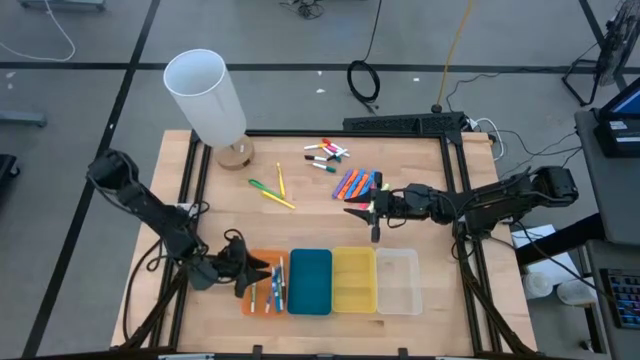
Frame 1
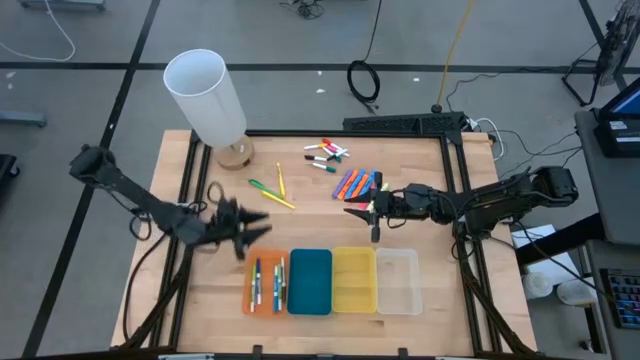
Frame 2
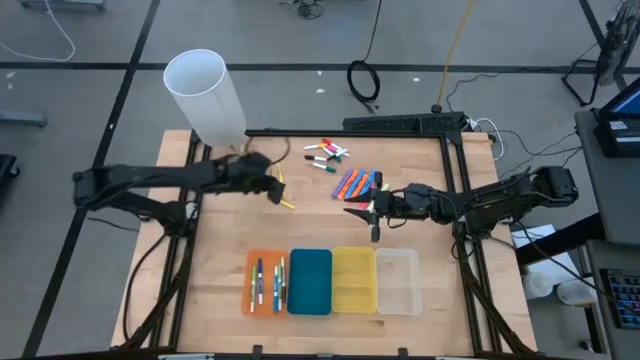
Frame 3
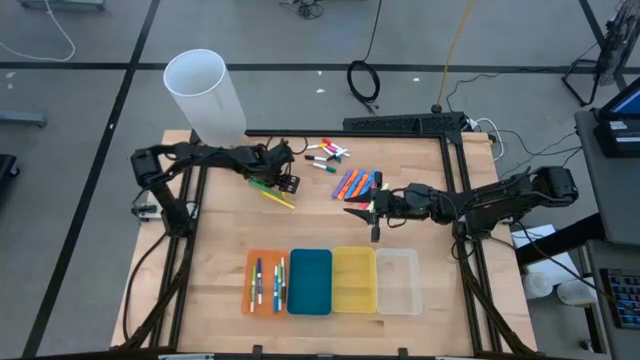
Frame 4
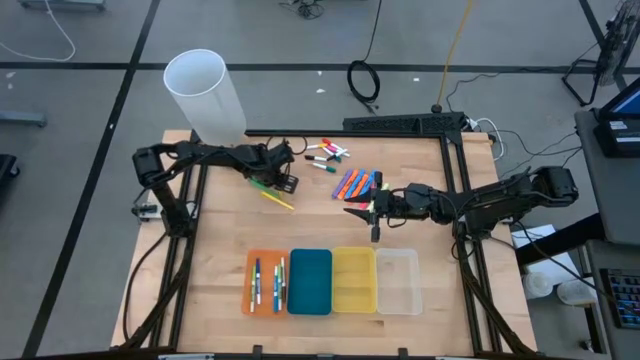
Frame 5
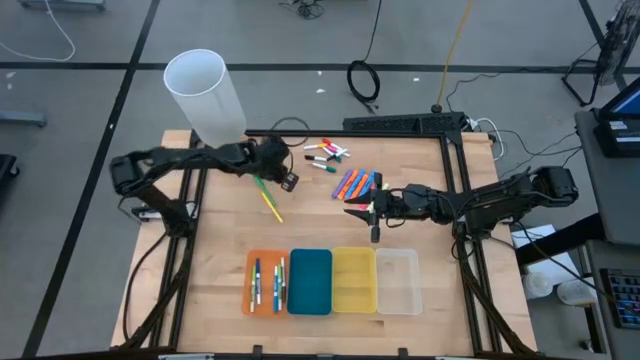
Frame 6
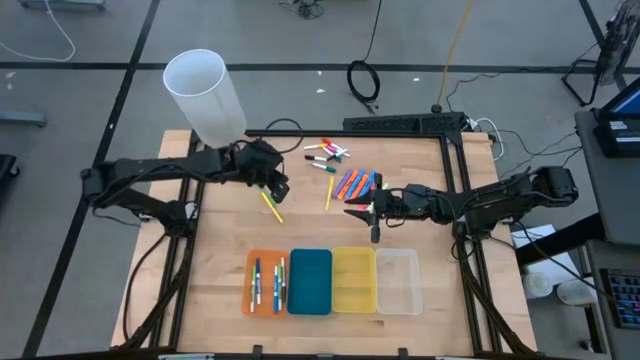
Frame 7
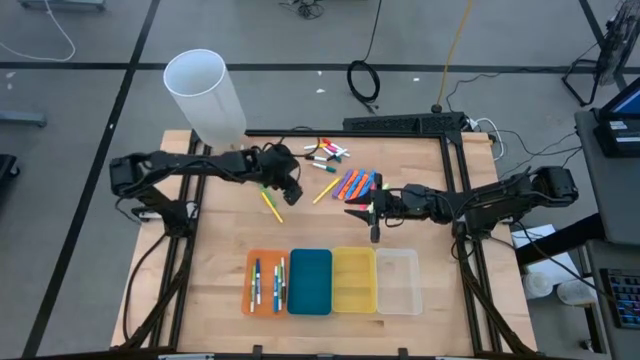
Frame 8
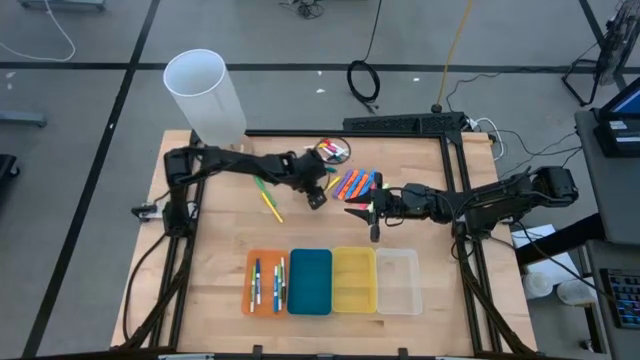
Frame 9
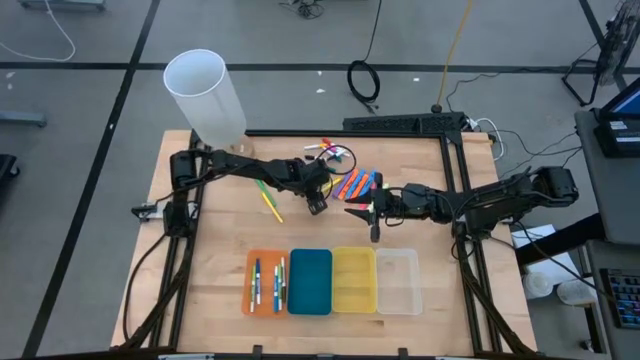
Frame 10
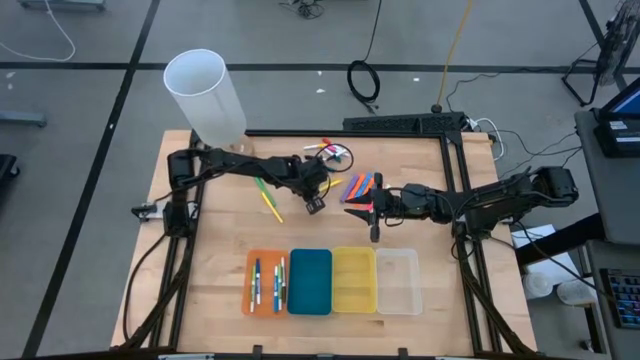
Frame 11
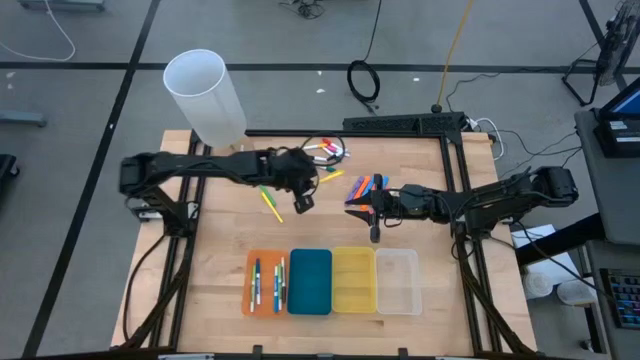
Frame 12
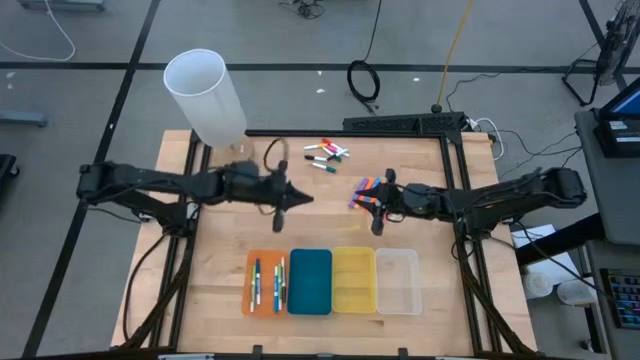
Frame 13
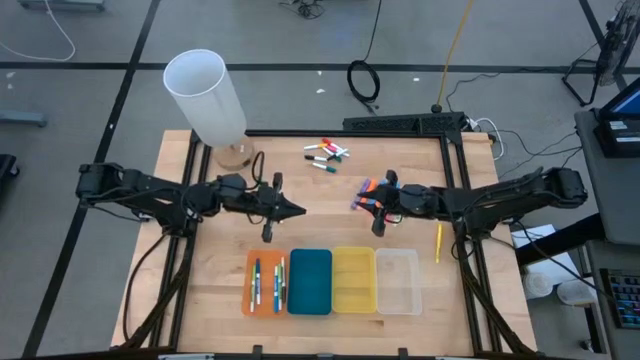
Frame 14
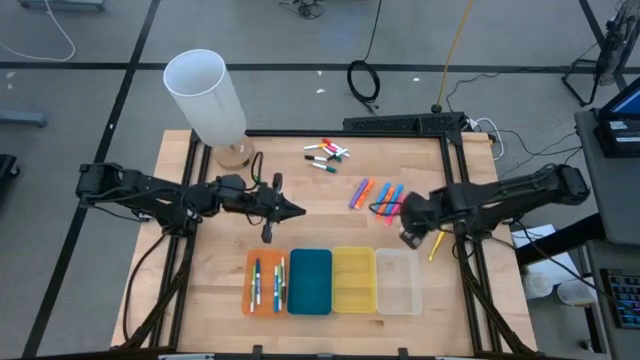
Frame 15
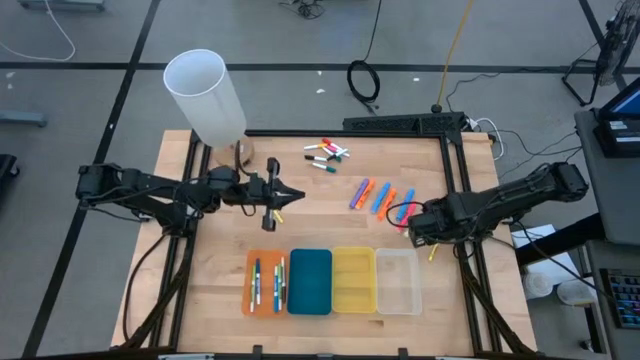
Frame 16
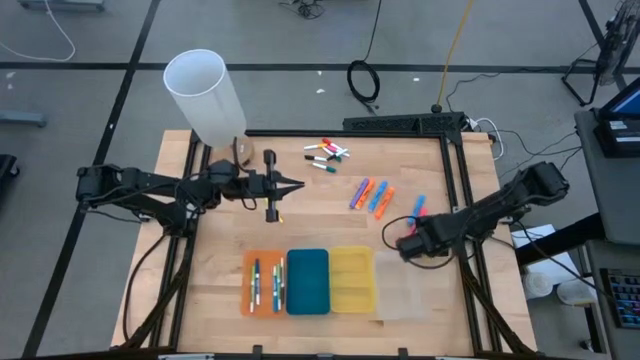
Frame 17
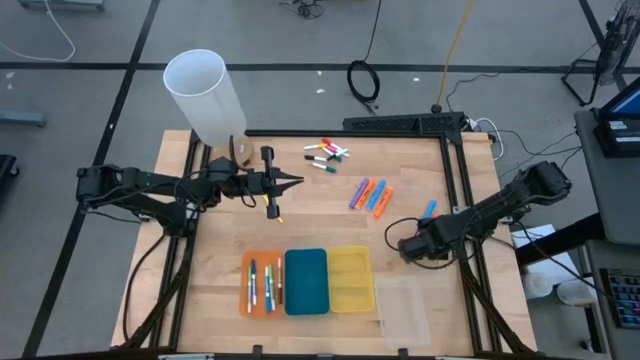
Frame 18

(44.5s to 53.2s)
Task: Pick & Place Markers
Put the top yellow pen into the transparent bin

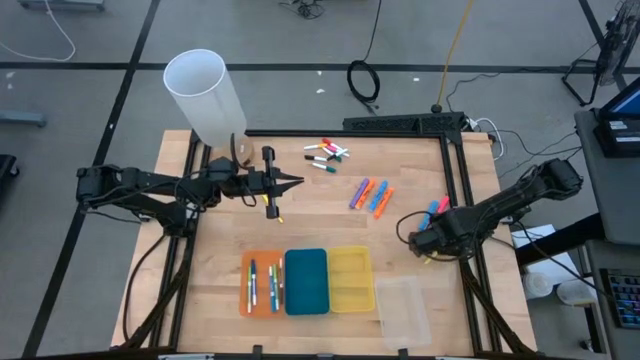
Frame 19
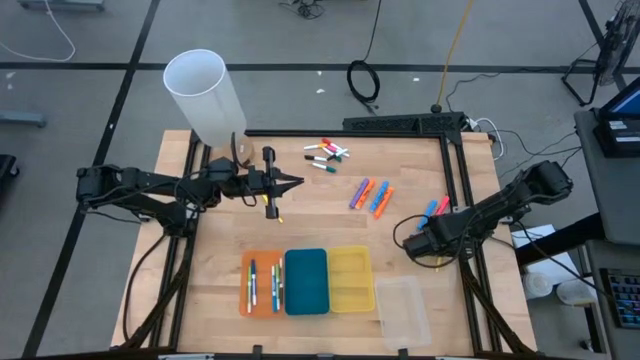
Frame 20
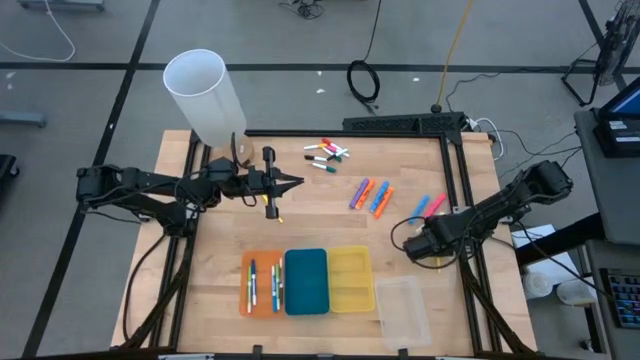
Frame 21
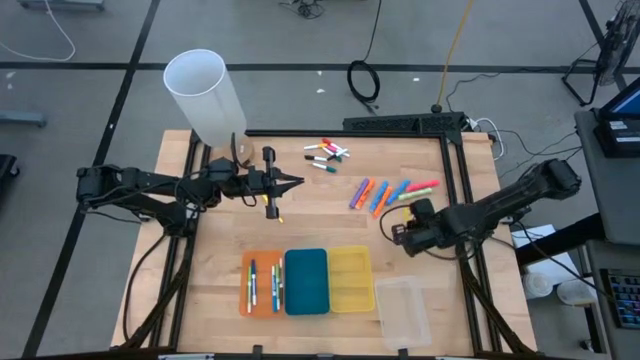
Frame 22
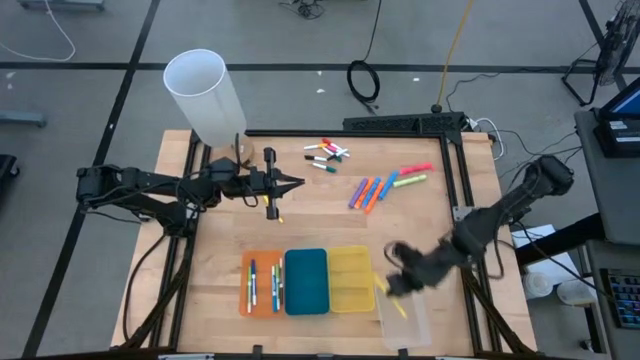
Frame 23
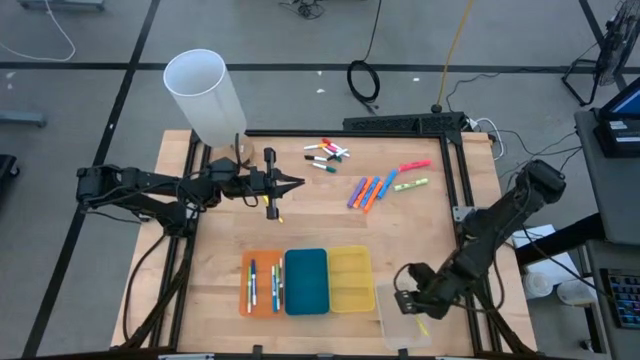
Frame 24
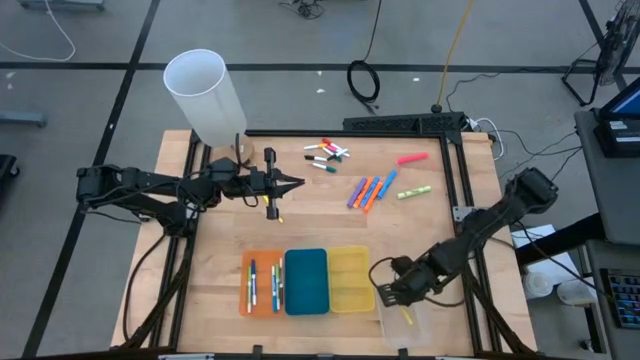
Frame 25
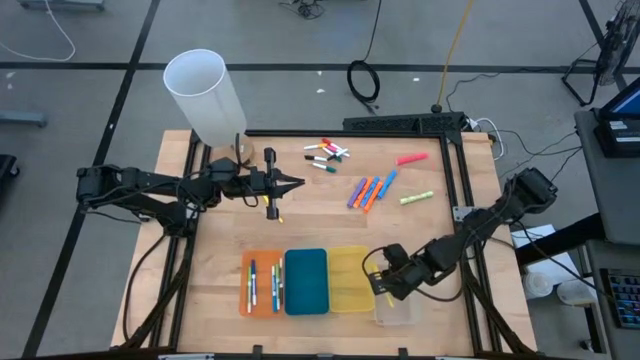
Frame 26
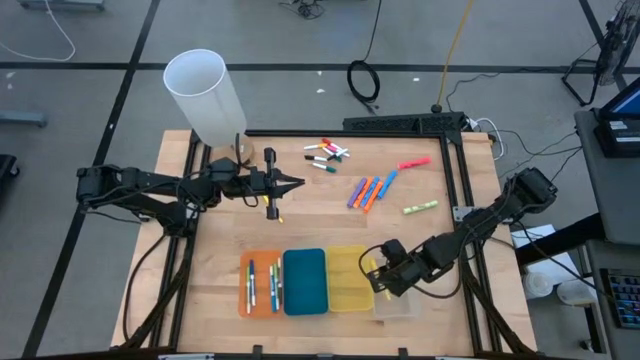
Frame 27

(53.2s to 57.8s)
Put the top yellow pen into the transparent bin

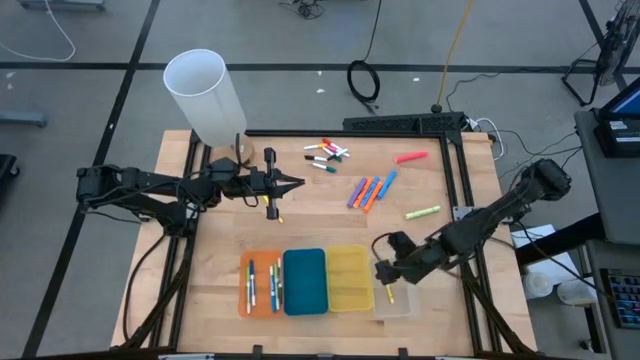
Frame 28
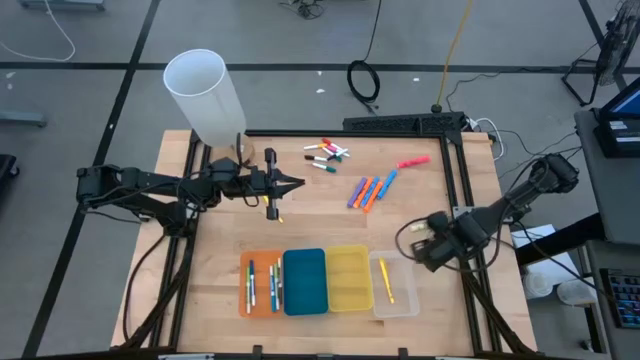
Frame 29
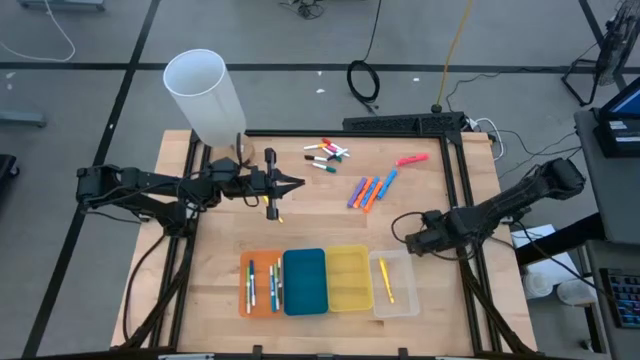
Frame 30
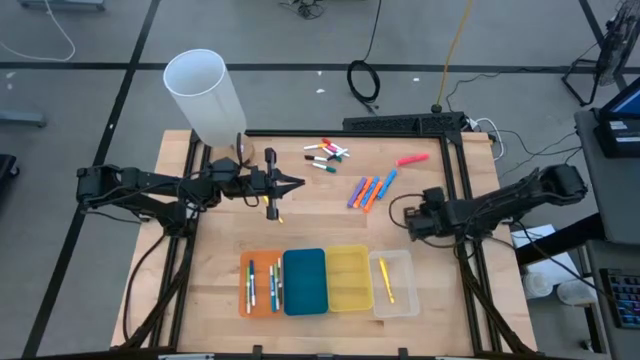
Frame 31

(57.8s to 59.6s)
Adjust the light green highlighter pen on the table

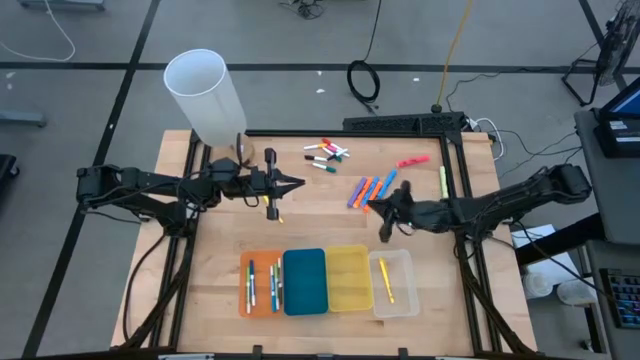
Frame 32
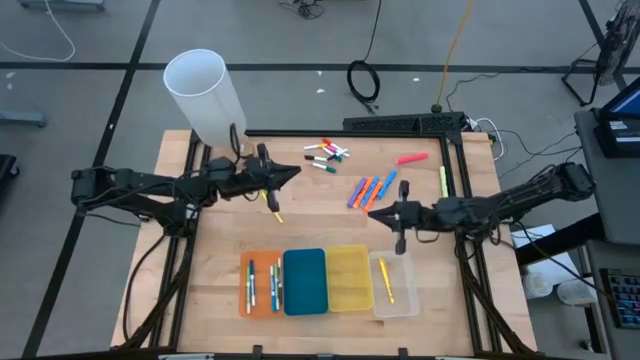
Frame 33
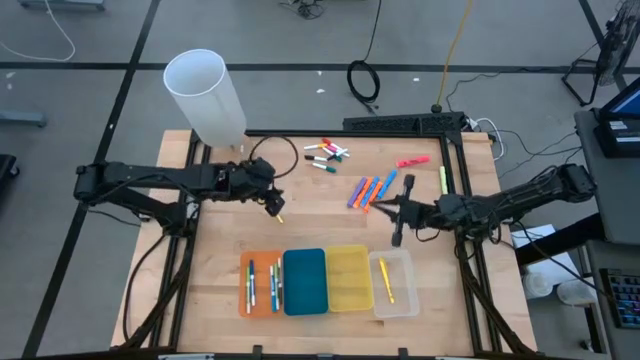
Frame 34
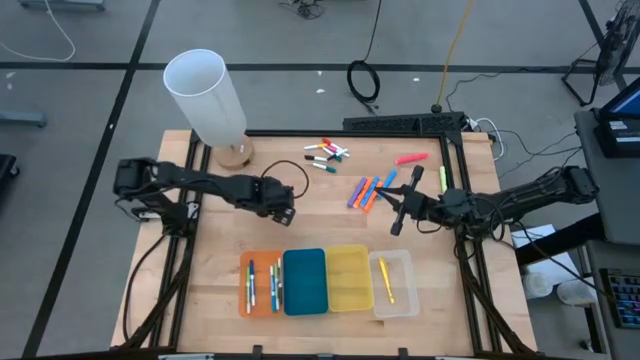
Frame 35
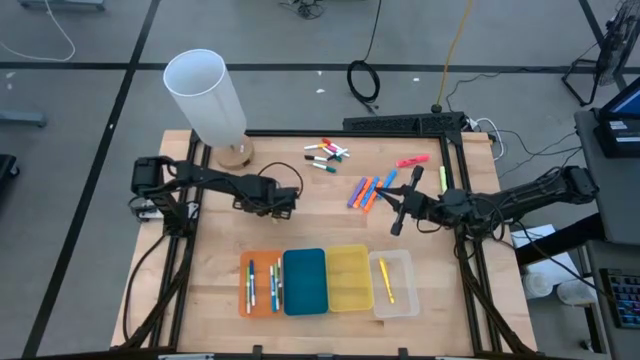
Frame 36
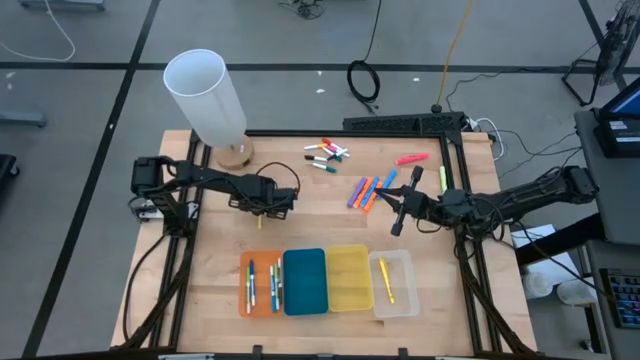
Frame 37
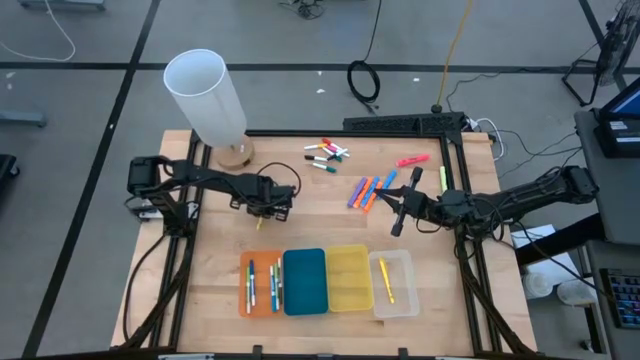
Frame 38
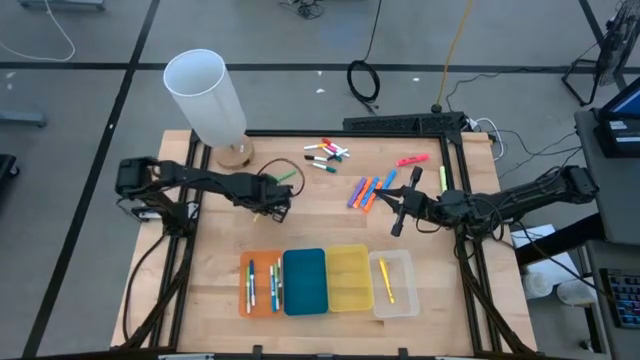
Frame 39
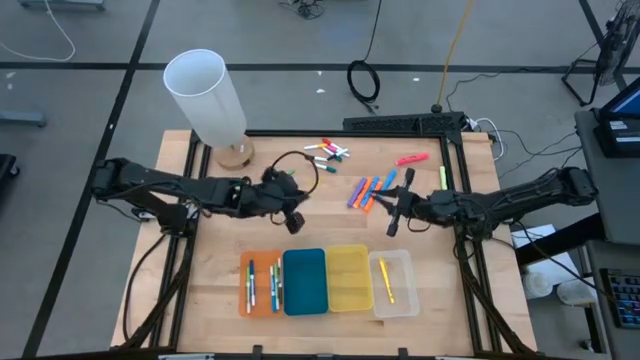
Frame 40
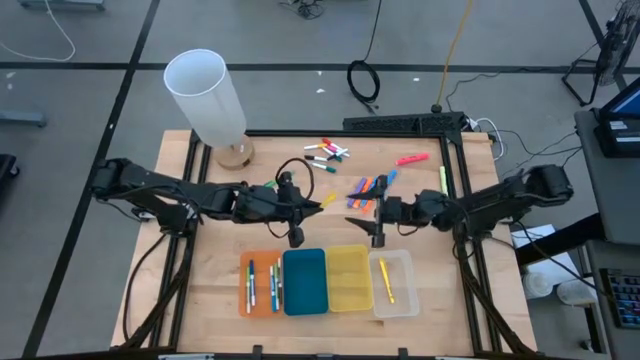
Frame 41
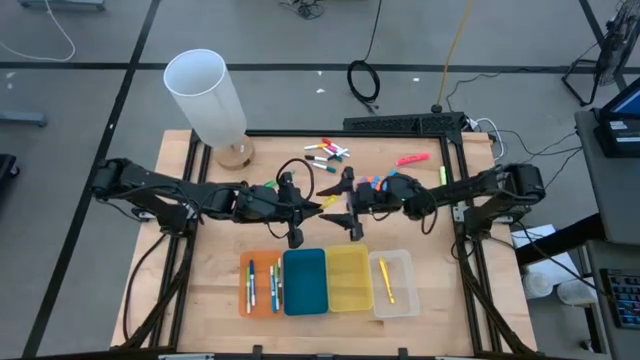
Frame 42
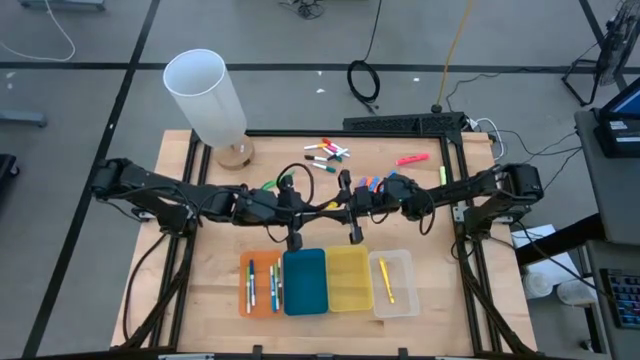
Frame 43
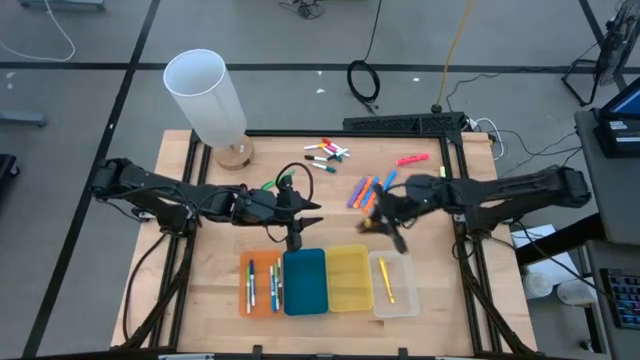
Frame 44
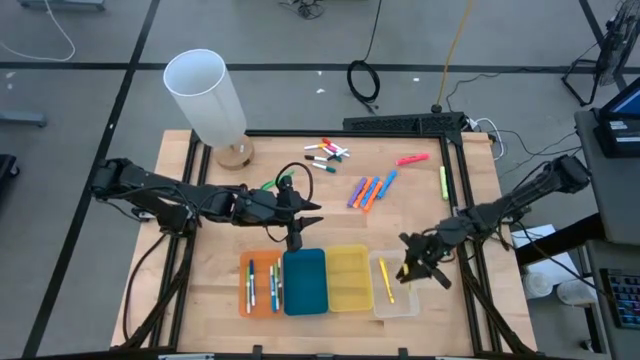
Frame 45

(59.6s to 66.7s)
Put the yellow pen into the transparent bin
